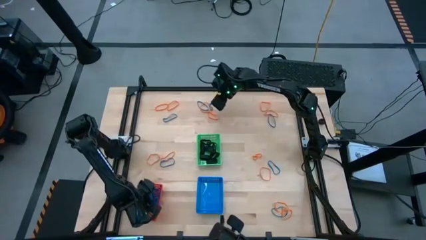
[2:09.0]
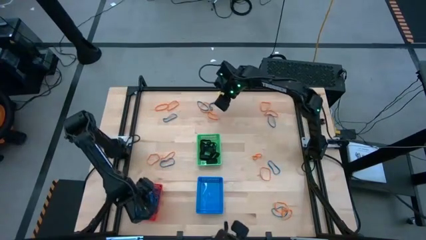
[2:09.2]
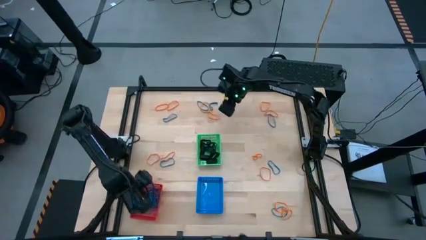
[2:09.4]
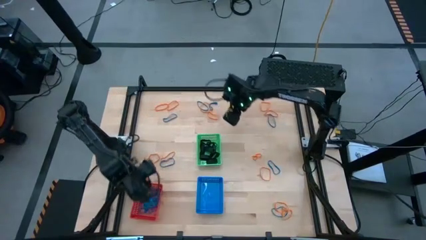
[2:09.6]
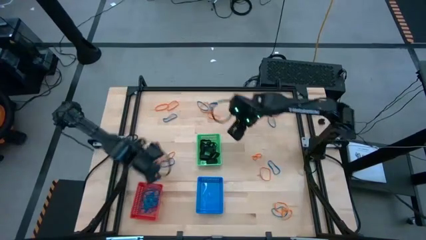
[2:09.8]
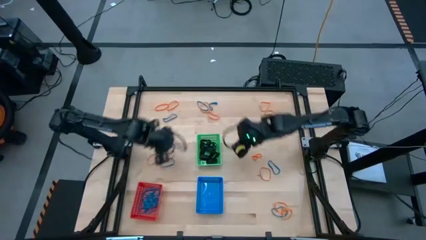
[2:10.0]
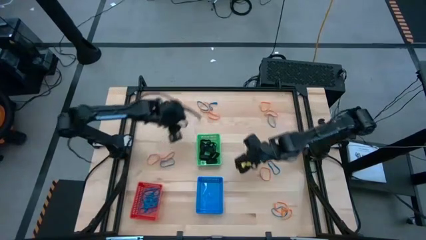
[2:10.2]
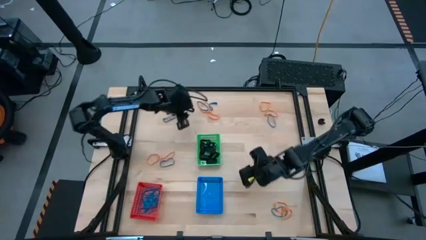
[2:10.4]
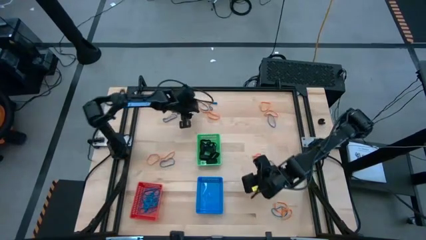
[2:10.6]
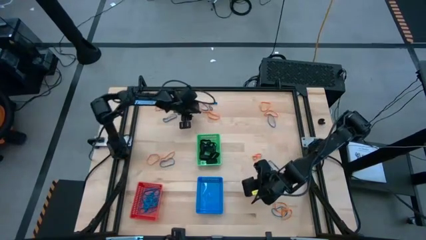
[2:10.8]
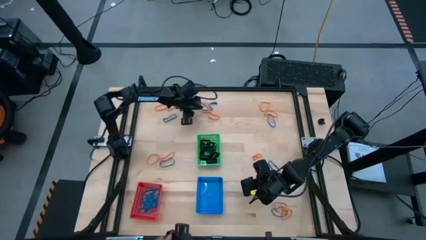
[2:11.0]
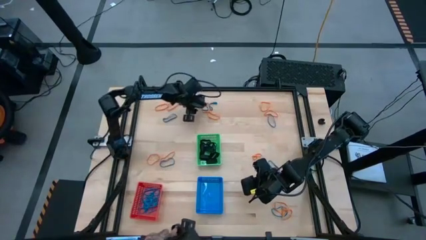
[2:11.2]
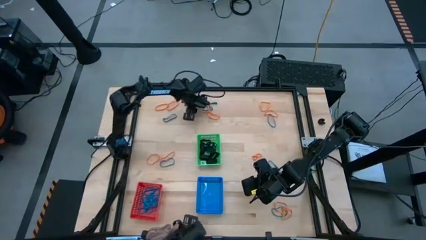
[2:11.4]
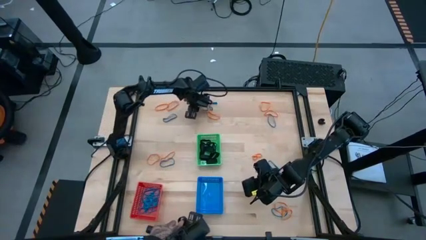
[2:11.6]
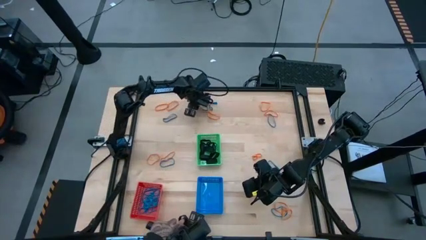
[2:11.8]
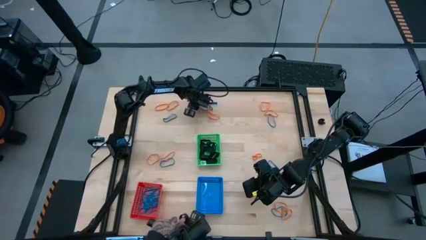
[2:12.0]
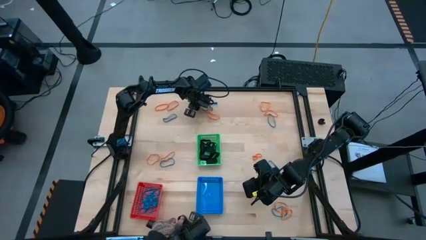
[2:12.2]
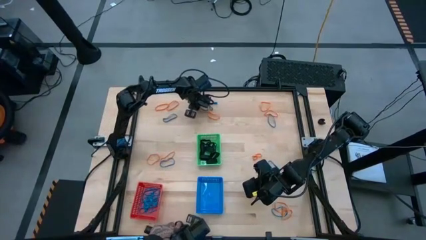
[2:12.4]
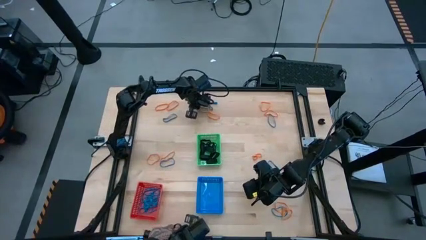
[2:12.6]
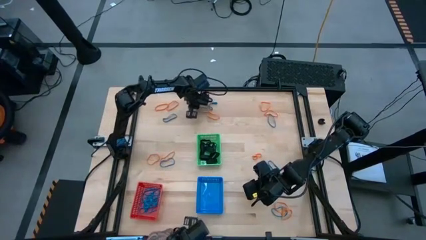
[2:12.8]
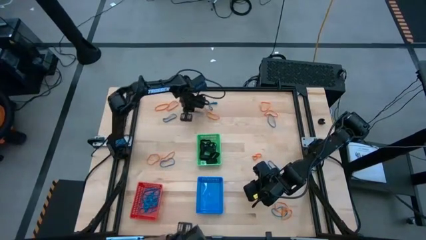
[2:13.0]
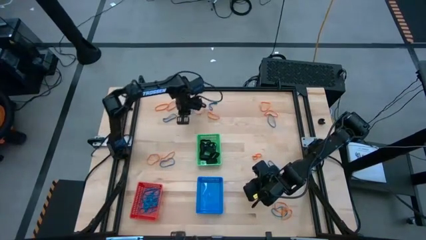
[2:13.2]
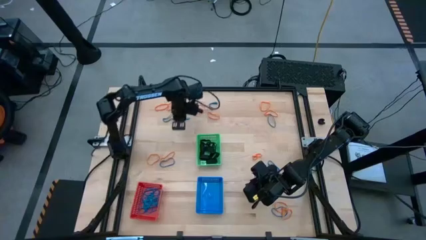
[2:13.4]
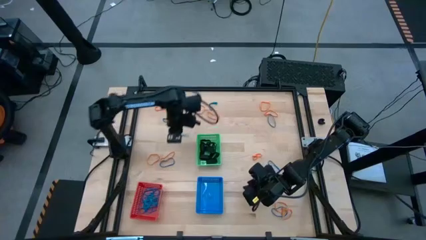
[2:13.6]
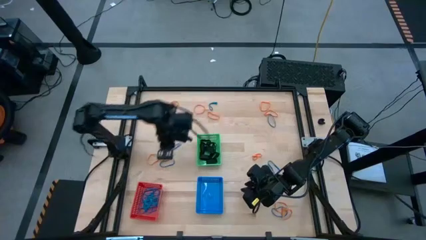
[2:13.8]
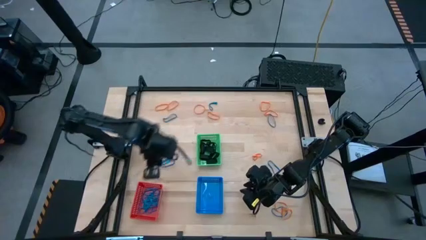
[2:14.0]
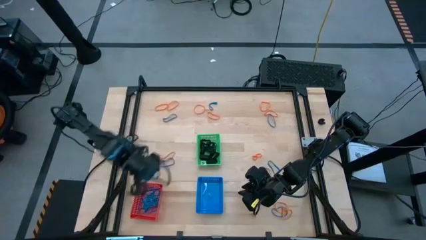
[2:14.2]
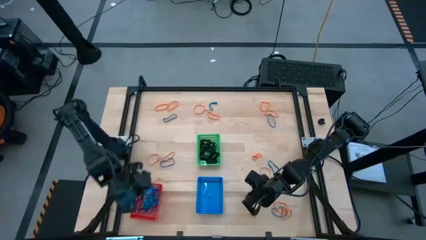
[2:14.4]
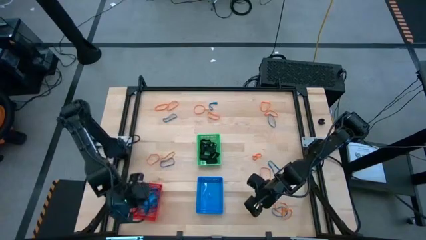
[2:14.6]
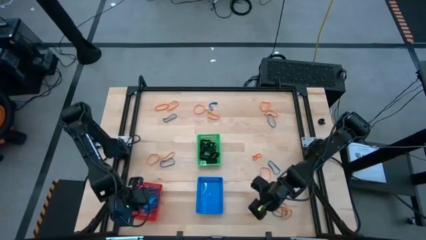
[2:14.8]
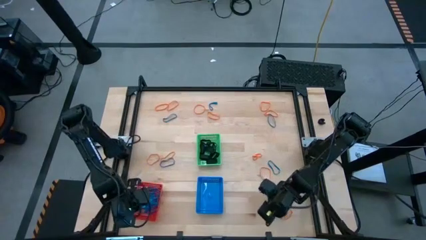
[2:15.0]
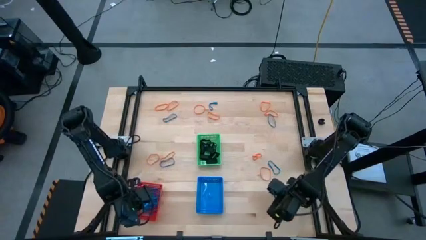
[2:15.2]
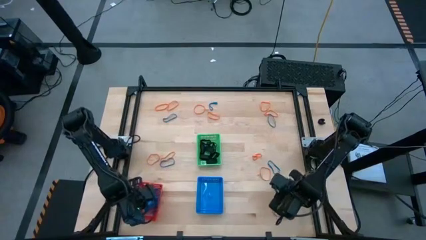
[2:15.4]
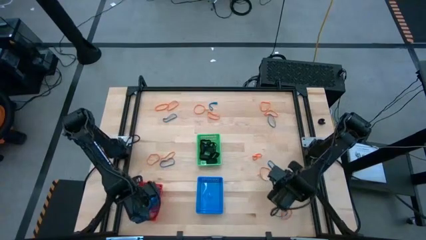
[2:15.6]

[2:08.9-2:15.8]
Task: Sort rubber bands into baskets
Put the blue rubberband into the red bin

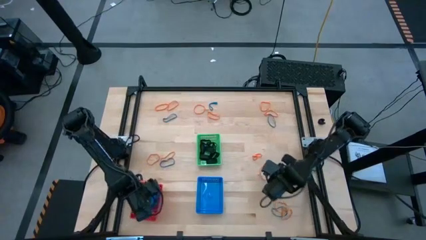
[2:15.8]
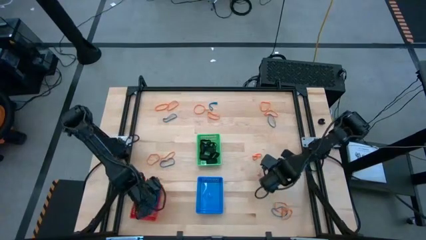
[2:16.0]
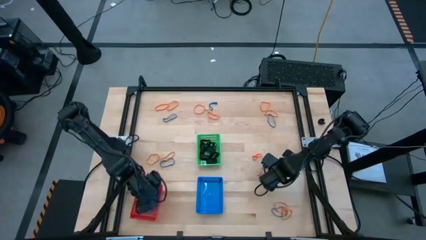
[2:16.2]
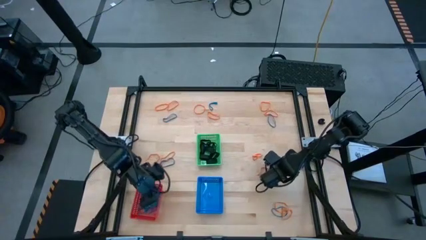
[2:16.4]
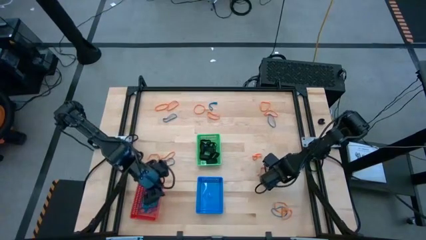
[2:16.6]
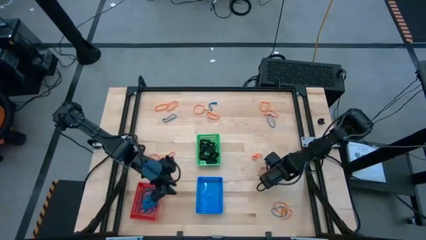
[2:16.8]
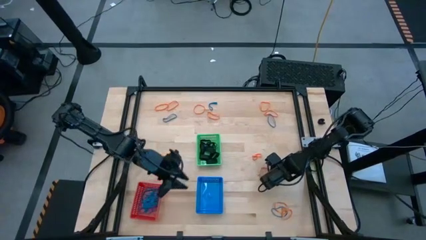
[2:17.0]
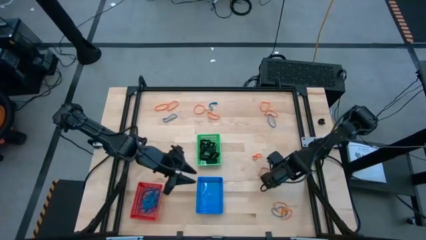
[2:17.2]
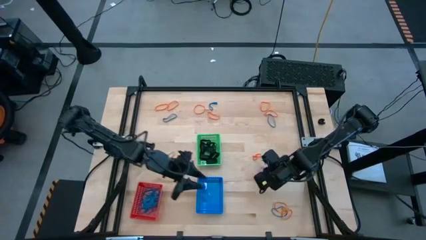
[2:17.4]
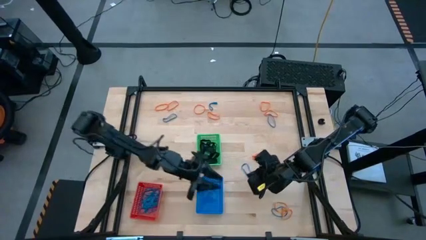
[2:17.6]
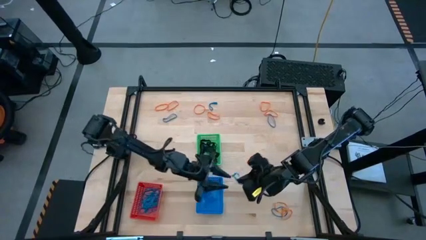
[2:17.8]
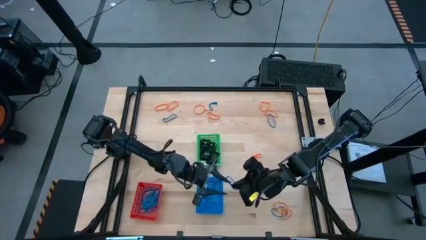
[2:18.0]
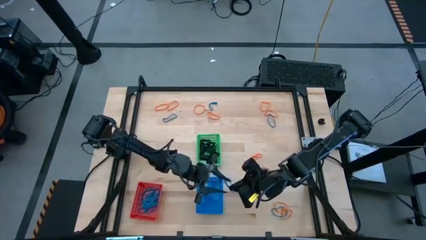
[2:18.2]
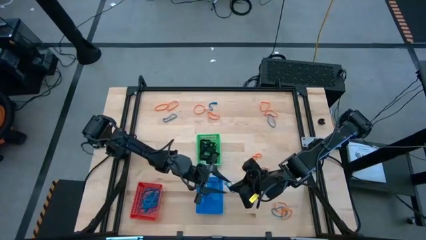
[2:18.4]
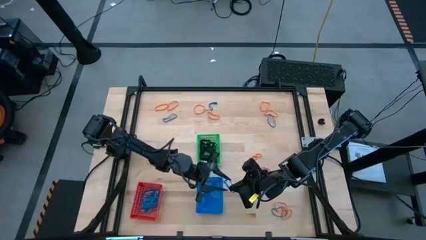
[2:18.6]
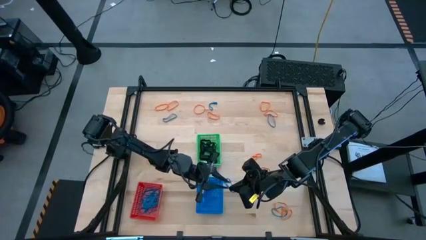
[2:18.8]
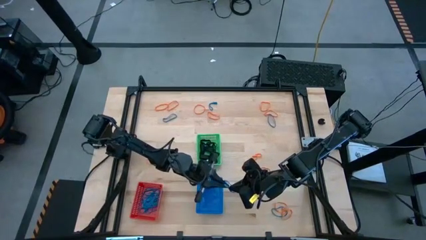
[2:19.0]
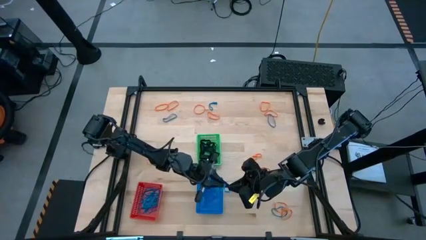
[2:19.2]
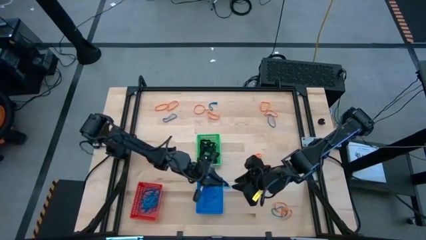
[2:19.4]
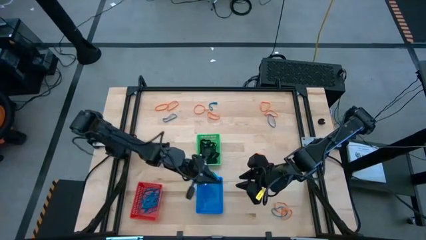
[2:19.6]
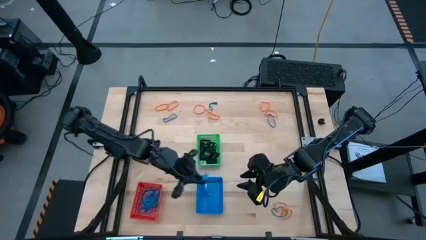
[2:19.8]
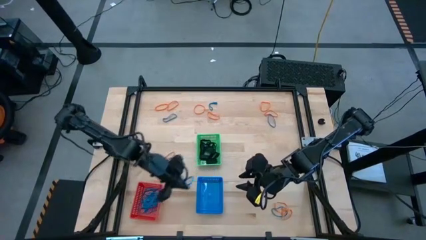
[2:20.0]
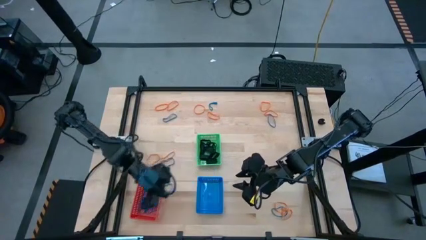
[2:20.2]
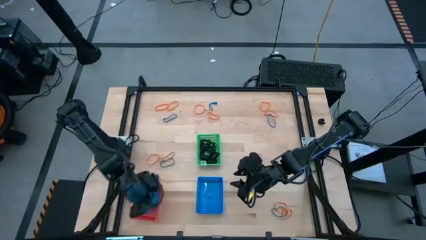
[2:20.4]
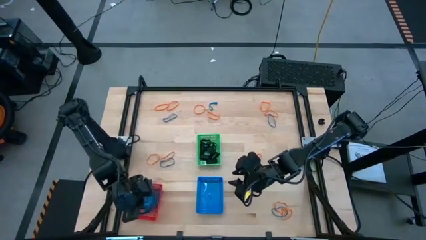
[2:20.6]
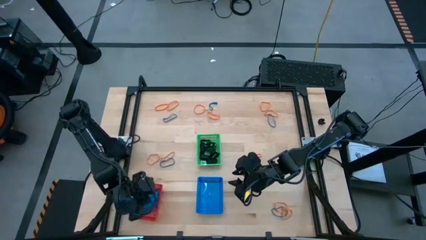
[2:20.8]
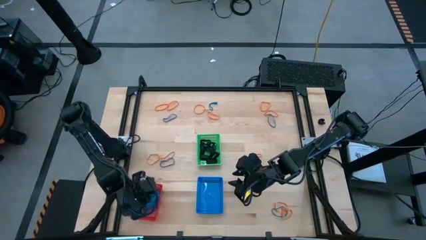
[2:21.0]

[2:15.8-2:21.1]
Put the blue rubberband into the red bin

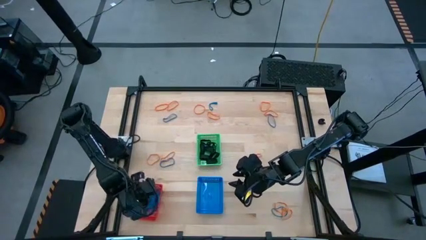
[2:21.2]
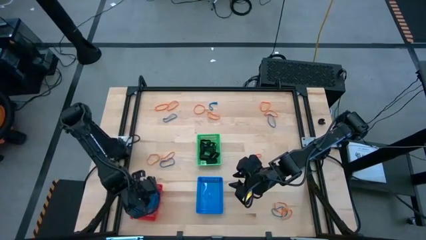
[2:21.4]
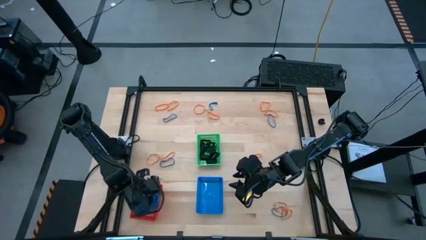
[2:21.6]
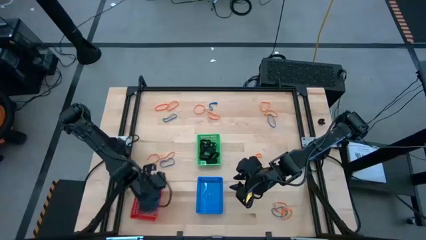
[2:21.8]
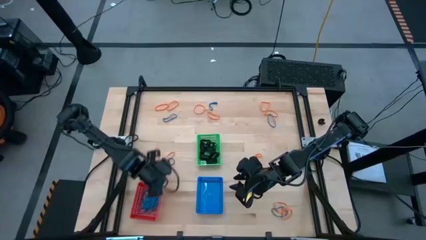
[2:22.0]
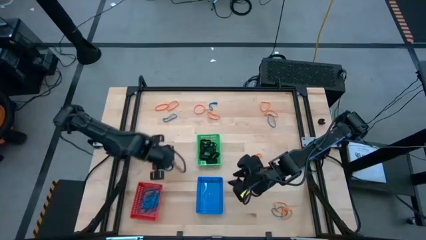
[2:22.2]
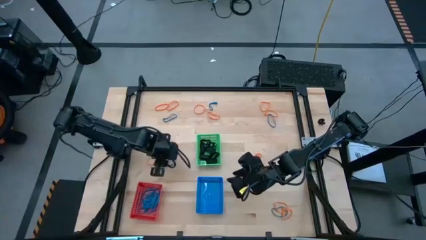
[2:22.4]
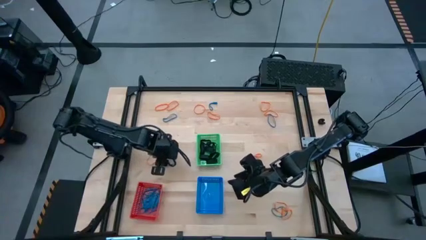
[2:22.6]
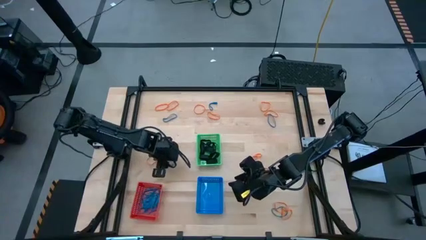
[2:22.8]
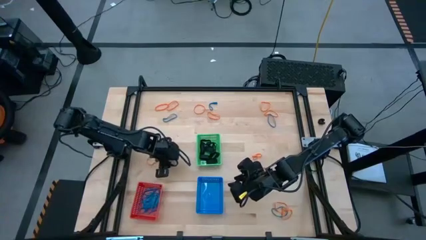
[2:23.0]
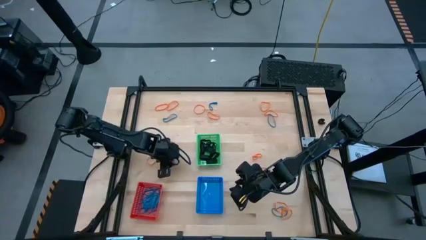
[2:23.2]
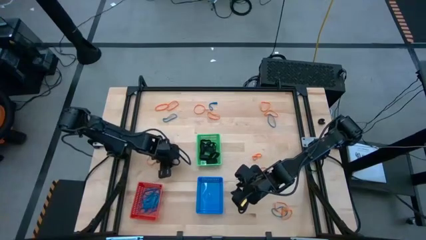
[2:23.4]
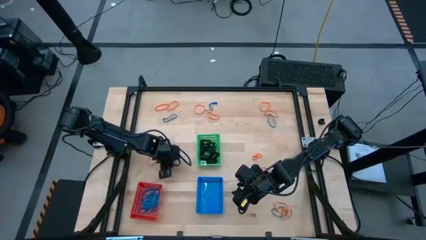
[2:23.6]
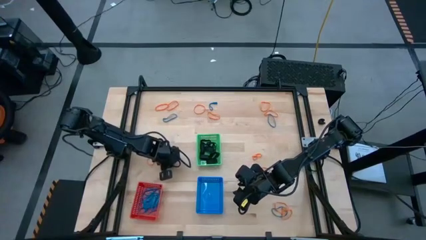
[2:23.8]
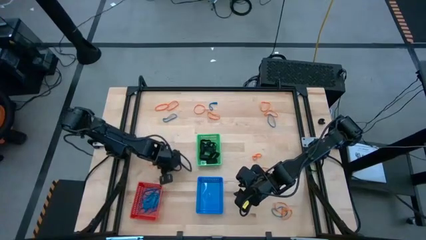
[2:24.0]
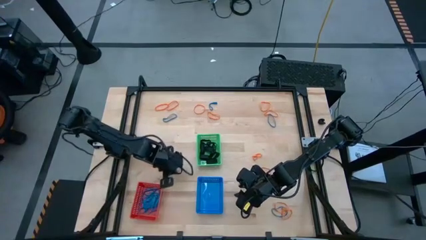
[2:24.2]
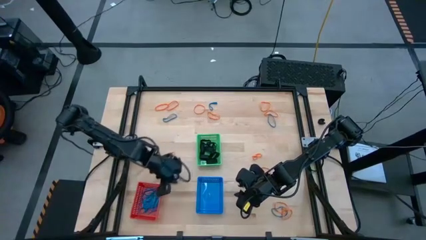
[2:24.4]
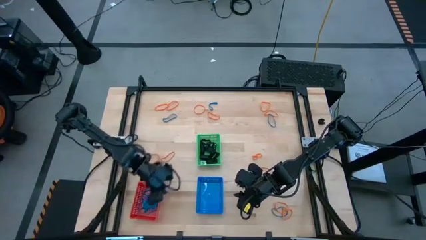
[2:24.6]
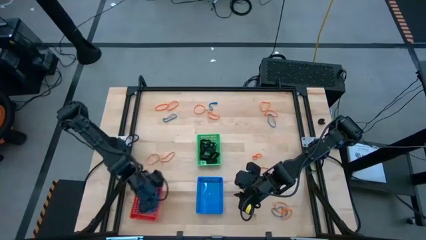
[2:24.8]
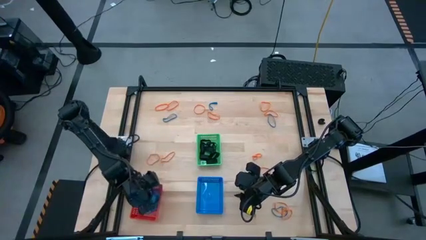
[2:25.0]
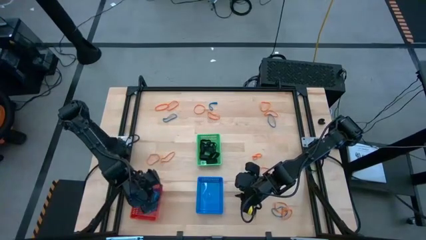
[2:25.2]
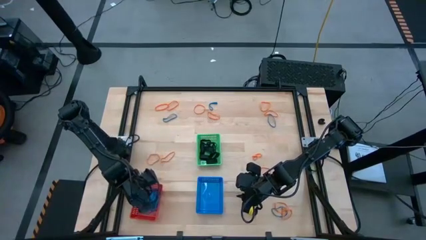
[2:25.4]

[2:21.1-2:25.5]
Put the blue rubberband into the red bin
